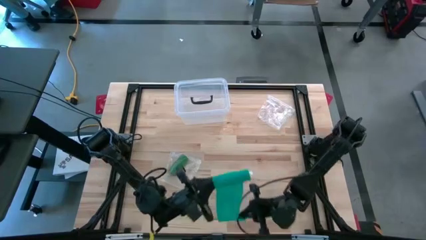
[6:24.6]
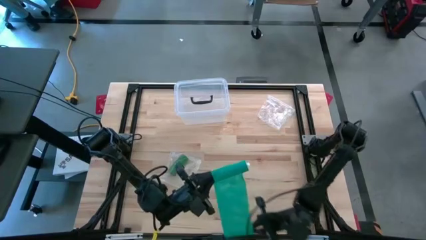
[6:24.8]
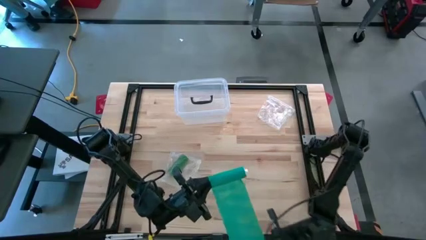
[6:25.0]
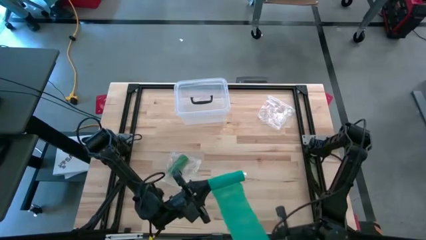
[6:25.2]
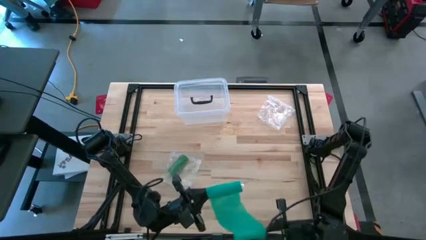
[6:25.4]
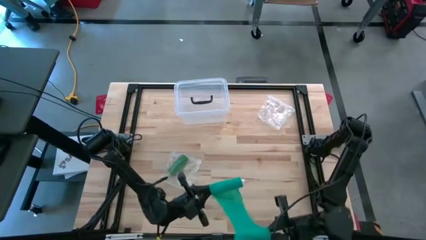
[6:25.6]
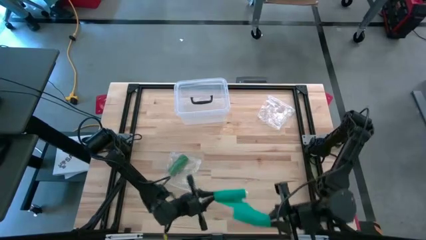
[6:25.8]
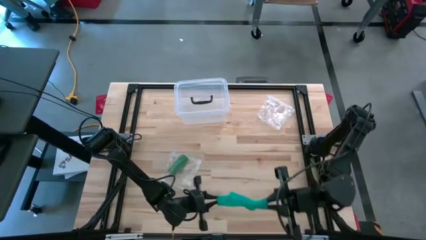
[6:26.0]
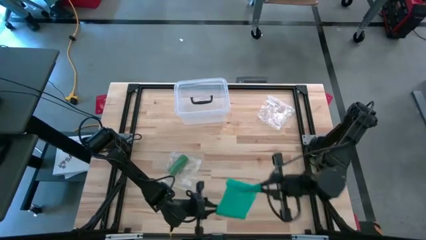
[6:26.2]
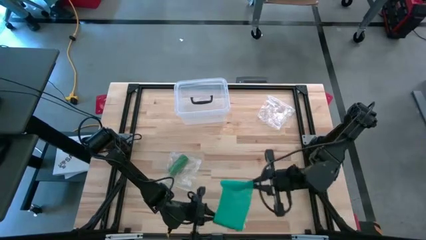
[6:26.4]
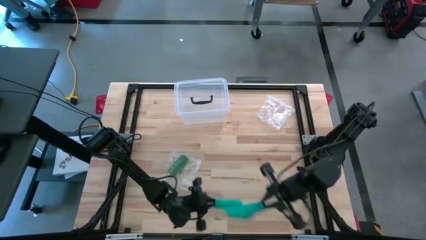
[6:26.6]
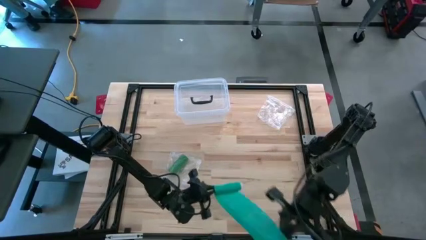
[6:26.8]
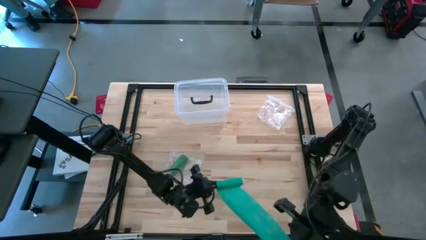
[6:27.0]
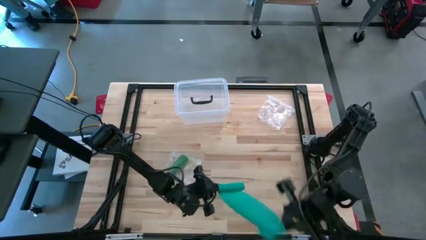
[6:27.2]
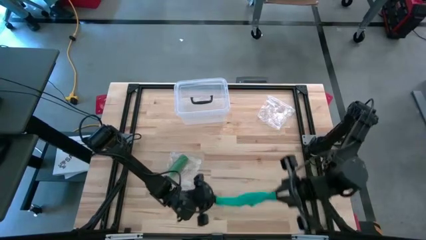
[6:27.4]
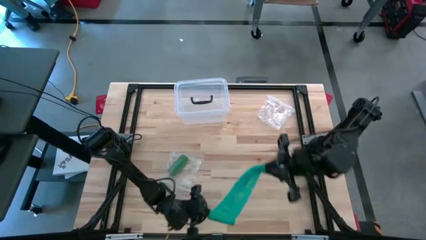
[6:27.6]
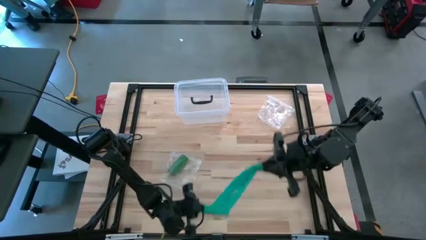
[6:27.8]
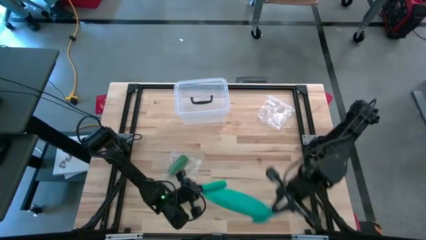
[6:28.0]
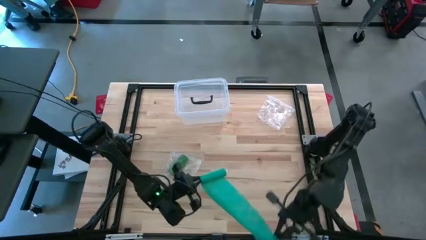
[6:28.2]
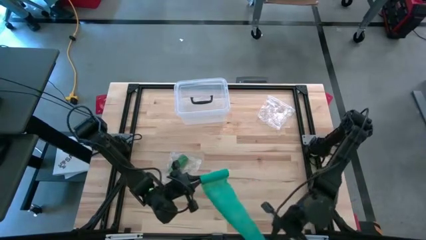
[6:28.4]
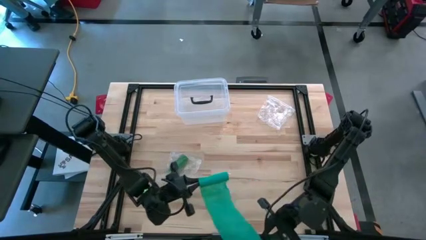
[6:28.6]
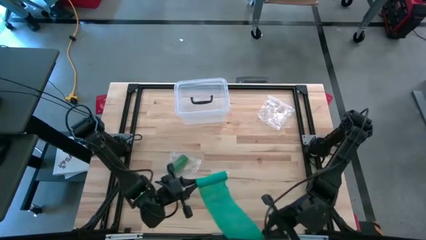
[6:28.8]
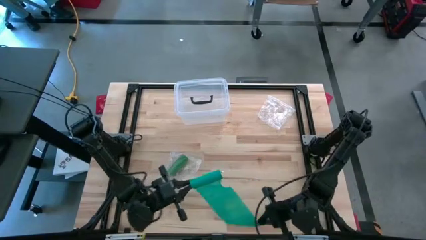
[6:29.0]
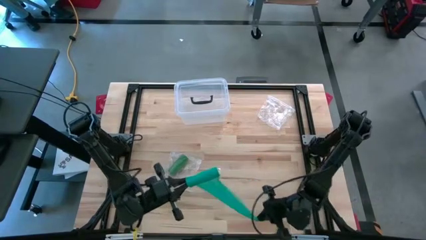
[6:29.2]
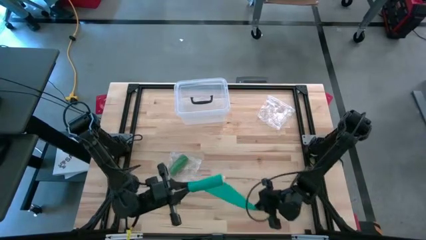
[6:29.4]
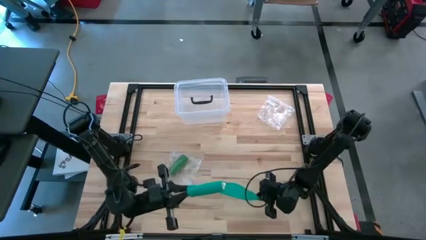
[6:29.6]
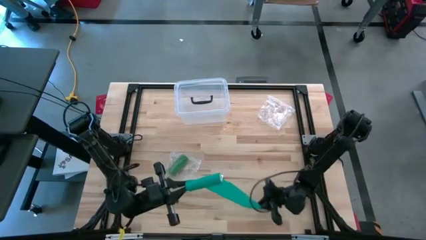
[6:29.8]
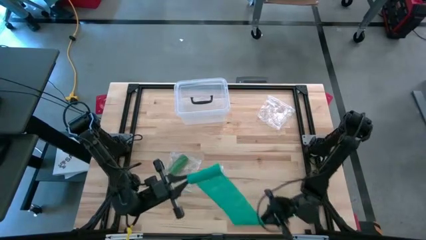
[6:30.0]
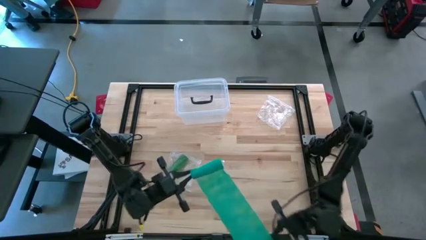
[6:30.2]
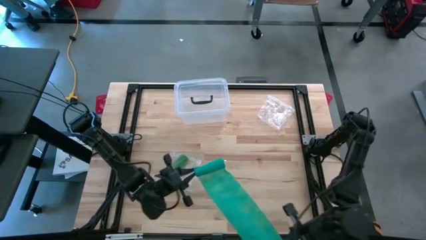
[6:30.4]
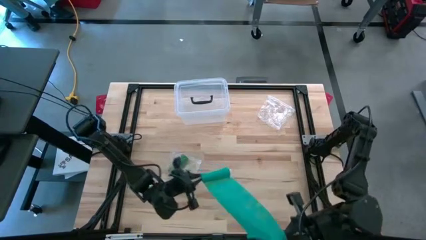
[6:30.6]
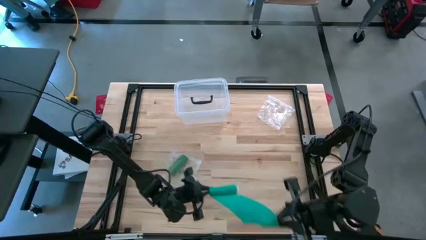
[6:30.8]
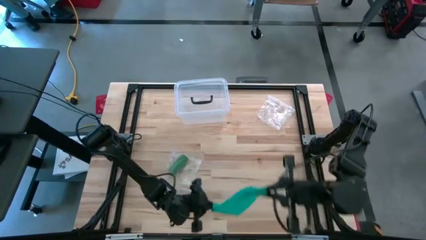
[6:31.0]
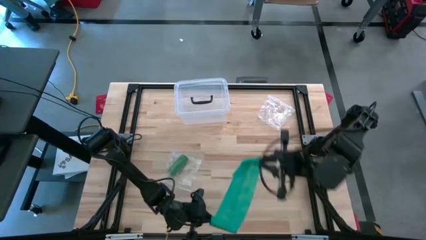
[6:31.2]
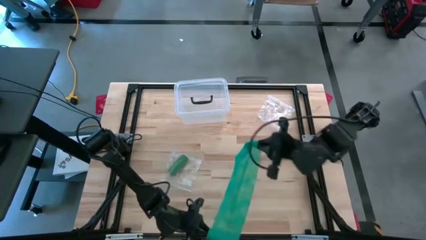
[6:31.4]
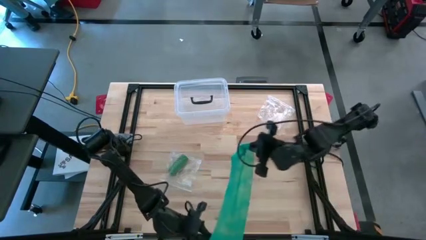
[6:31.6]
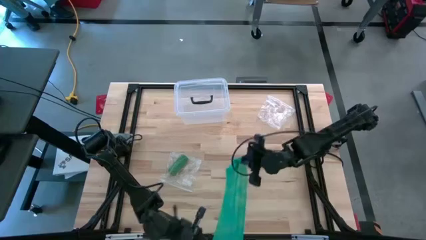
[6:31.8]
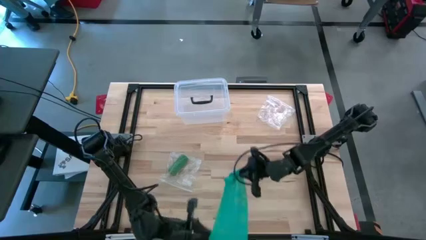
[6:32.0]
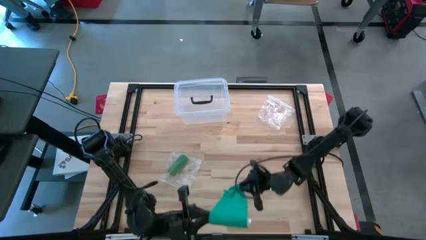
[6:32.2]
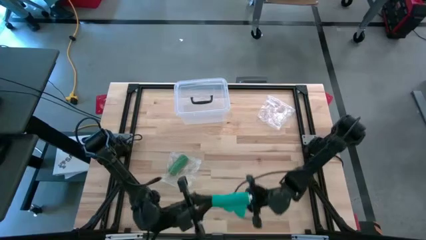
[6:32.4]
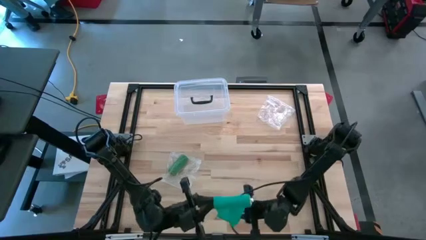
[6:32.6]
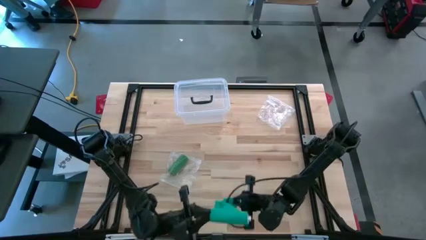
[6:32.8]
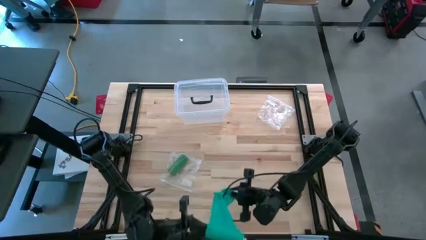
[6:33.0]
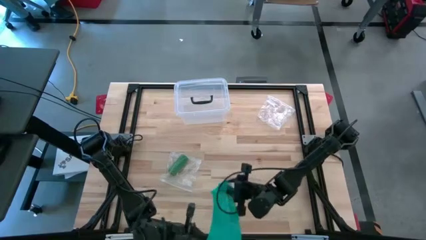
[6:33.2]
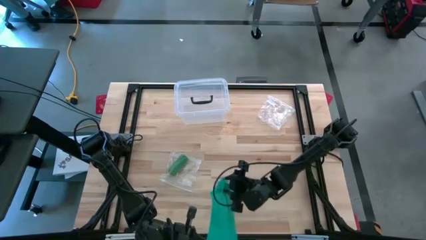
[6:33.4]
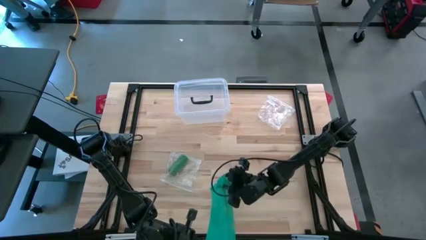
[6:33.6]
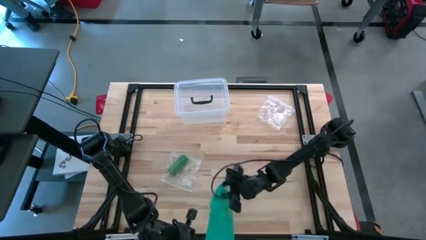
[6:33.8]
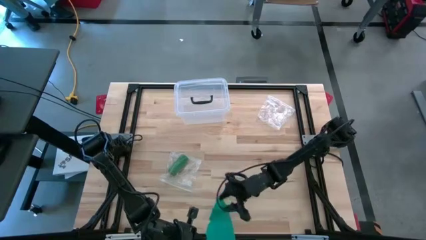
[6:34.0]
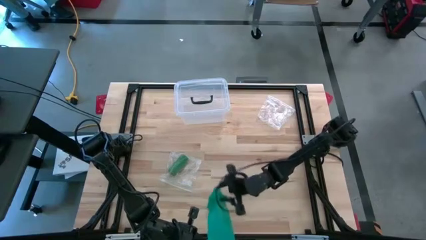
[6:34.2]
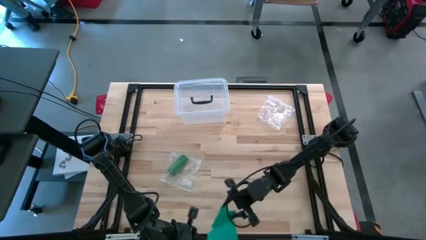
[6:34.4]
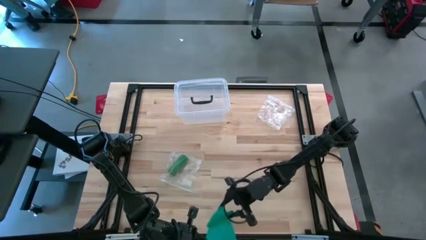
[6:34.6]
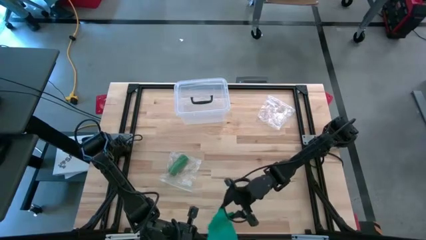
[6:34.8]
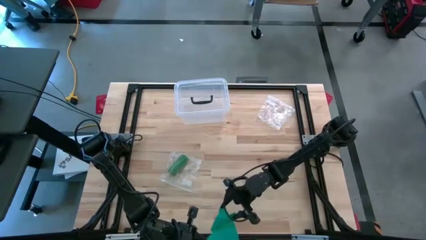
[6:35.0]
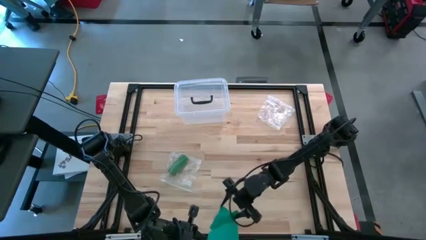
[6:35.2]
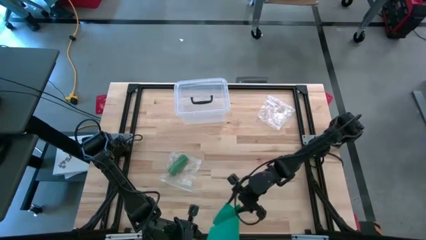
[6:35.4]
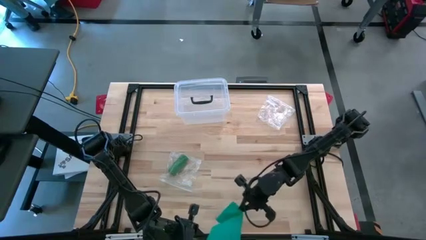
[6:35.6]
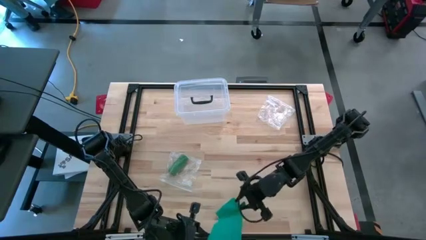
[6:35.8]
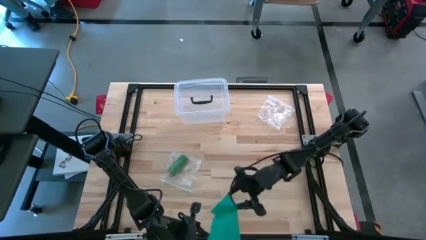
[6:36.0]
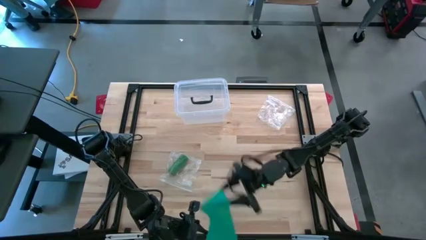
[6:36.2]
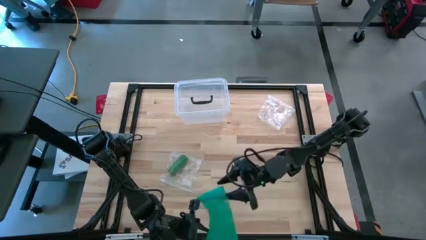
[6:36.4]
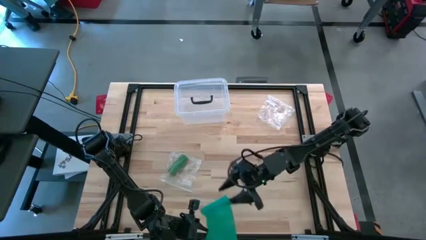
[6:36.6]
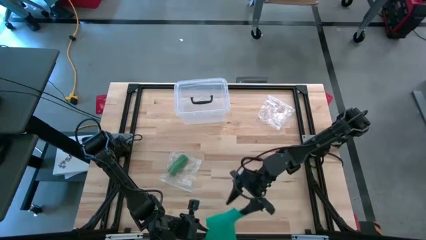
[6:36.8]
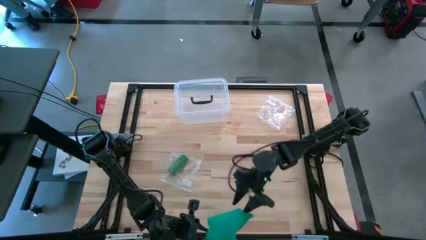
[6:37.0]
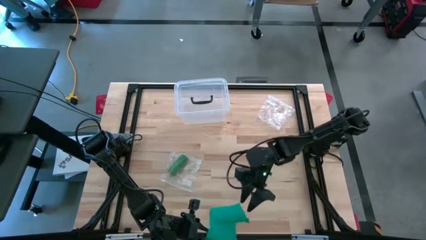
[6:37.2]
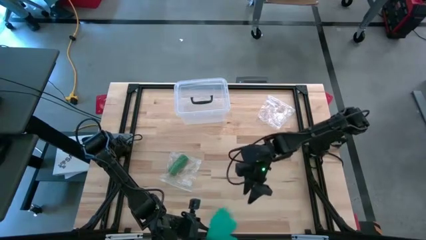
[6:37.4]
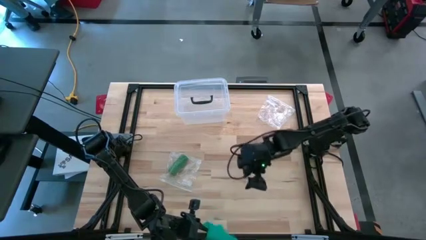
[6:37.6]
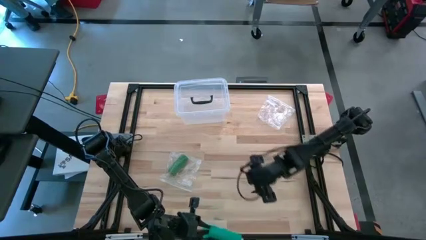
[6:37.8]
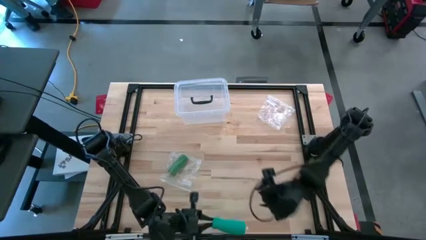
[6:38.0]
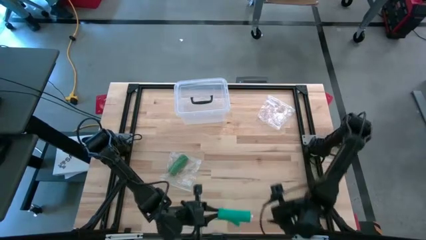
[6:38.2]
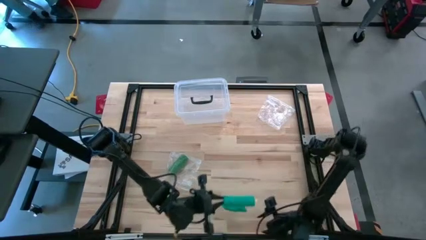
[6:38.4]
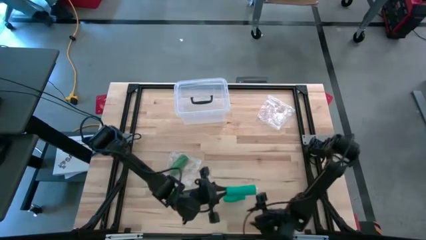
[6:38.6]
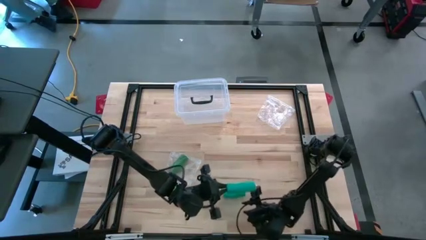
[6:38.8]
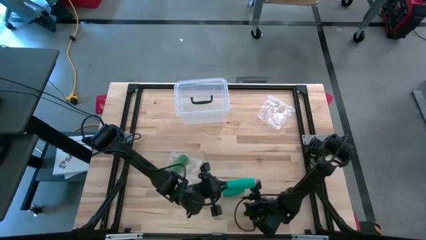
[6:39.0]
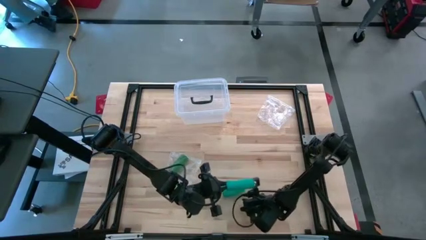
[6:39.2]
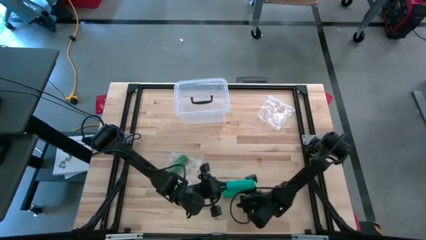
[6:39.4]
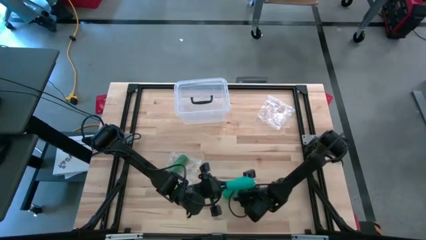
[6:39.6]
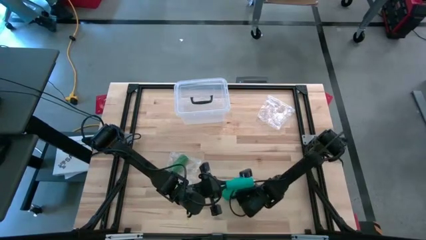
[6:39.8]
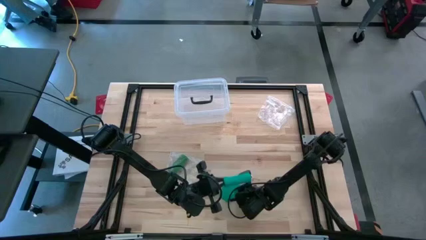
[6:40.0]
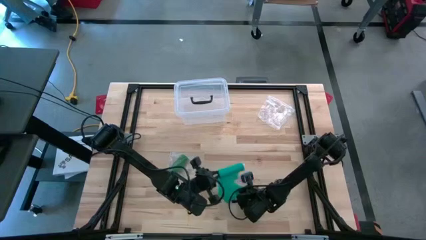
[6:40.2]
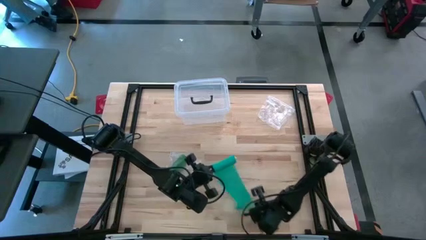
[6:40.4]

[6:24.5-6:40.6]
Task: Roll bandage
Roll the dark green bandage
